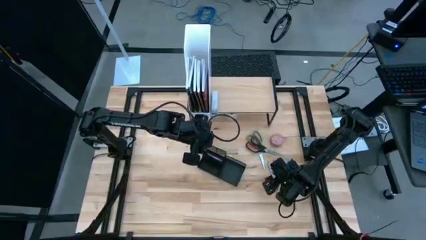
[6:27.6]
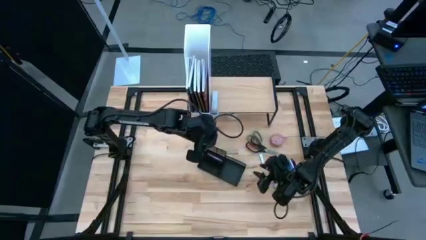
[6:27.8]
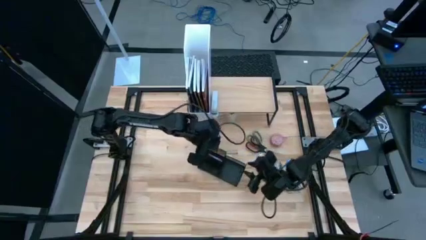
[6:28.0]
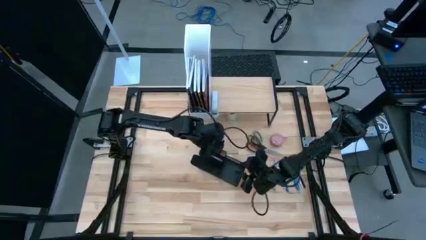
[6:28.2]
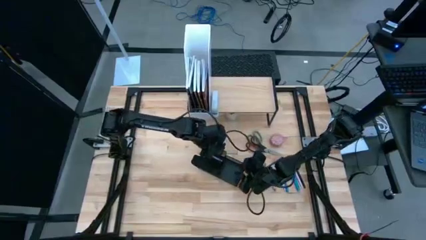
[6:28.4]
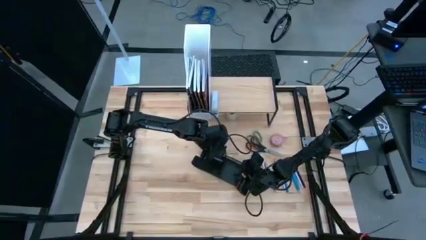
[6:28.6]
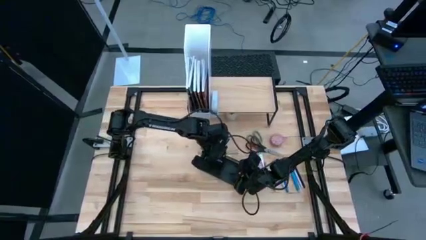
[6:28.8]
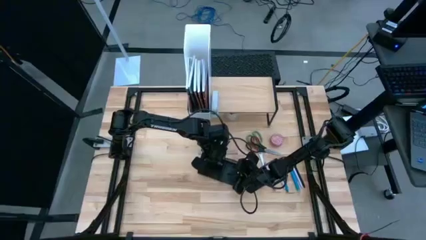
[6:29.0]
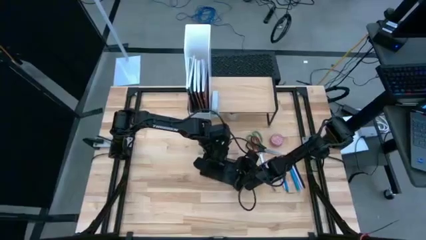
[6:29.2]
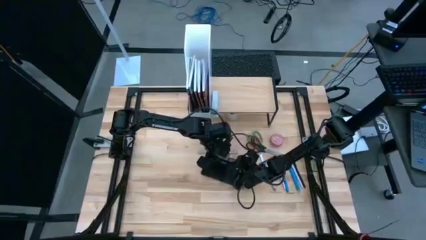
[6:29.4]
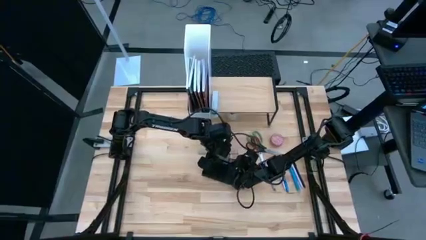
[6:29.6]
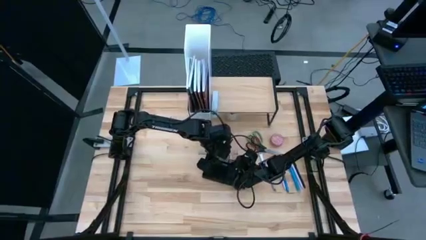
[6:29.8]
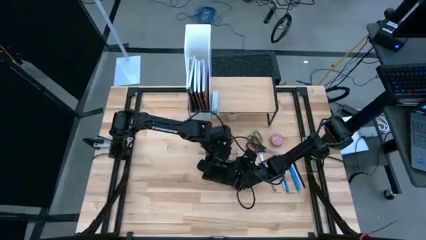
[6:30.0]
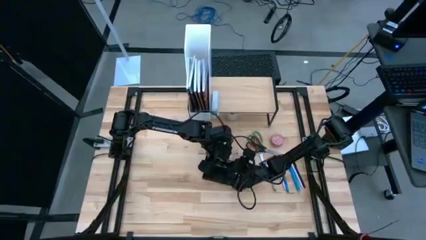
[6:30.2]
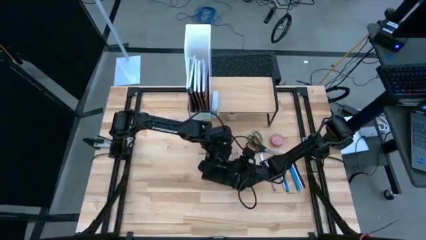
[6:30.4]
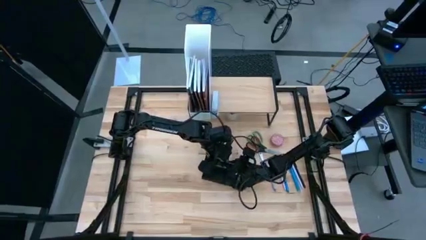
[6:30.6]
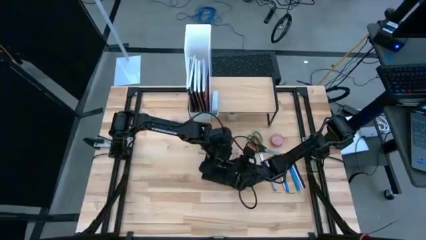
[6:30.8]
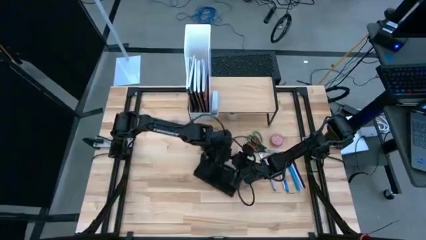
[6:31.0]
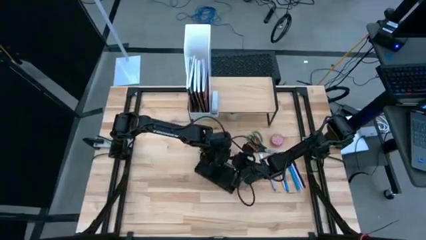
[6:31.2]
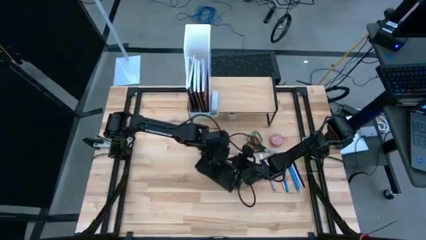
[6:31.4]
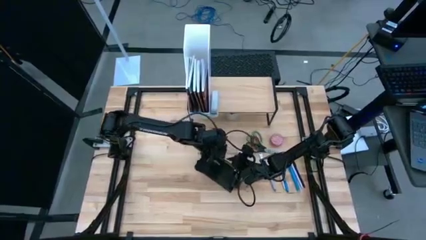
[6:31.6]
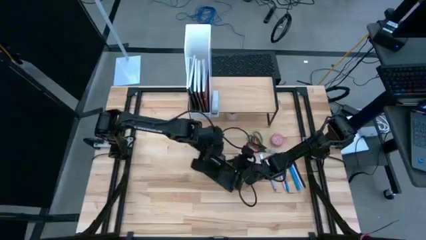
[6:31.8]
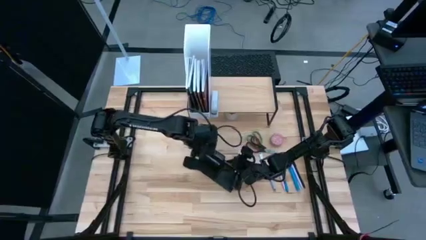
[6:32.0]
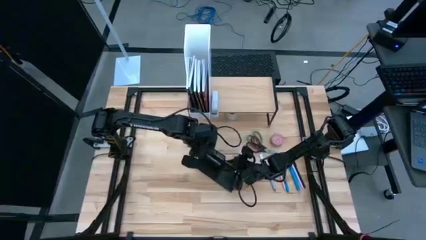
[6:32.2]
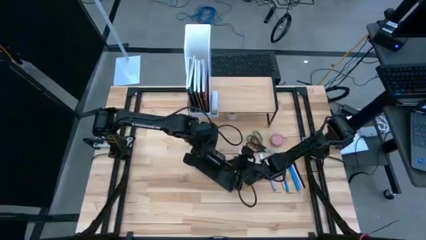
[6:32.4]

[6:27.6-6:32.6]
Task: Stock shelves
Remove the black pen from the desk organizer

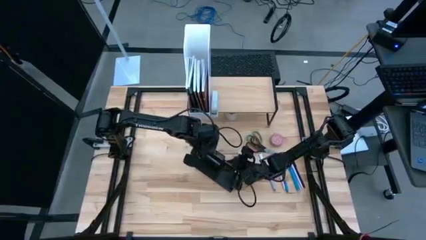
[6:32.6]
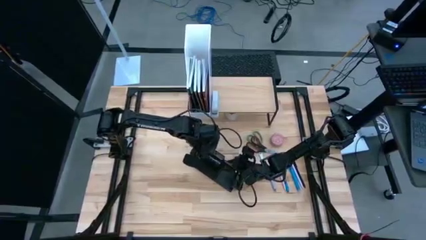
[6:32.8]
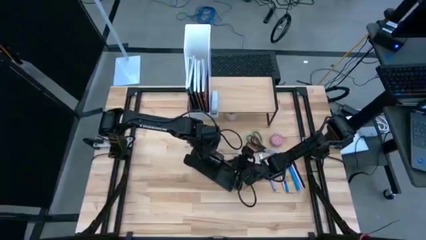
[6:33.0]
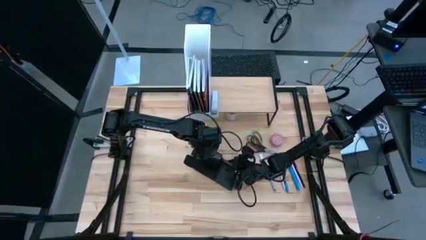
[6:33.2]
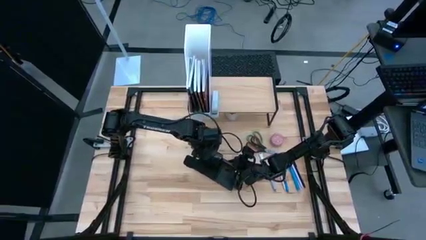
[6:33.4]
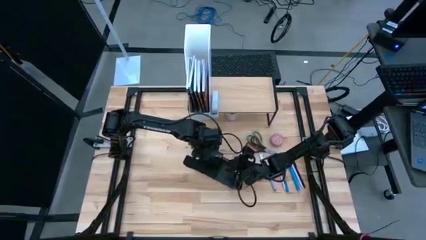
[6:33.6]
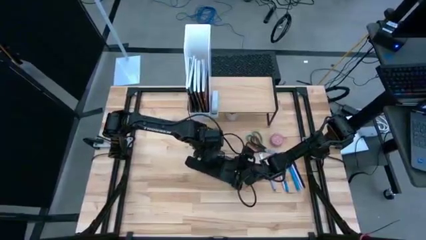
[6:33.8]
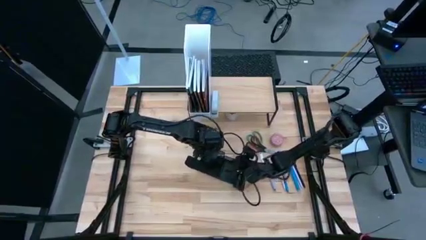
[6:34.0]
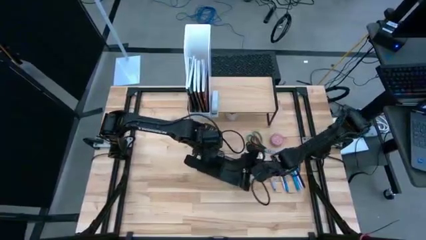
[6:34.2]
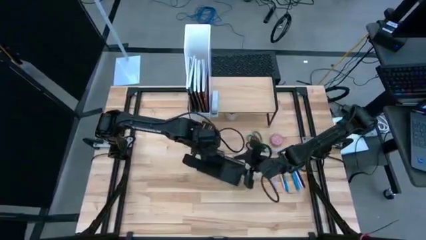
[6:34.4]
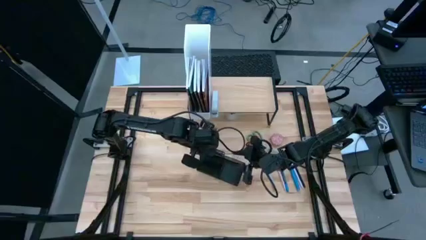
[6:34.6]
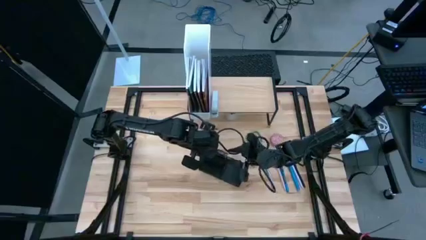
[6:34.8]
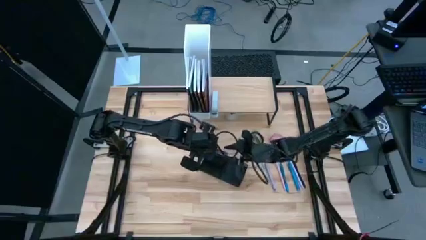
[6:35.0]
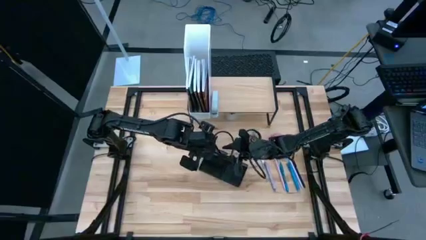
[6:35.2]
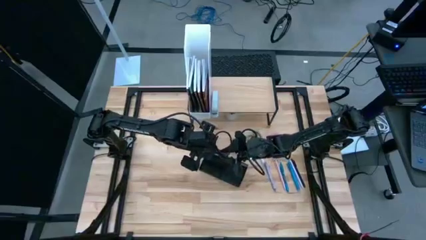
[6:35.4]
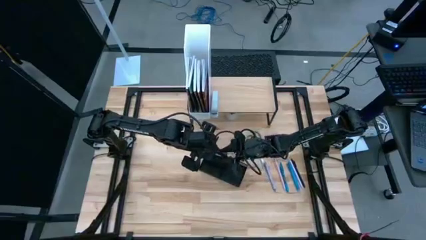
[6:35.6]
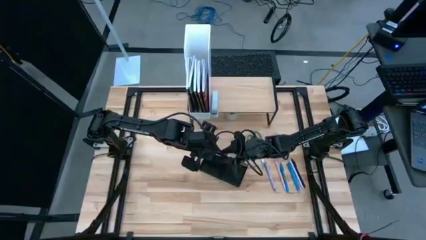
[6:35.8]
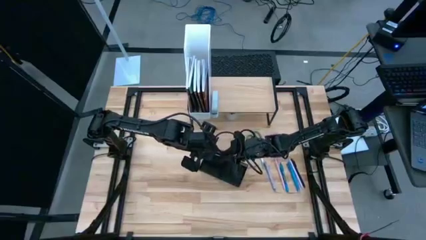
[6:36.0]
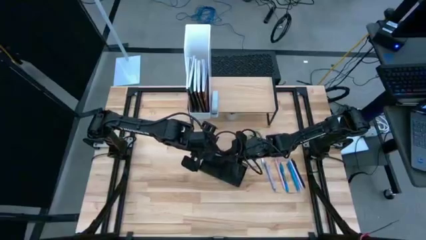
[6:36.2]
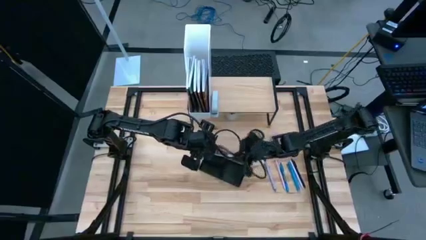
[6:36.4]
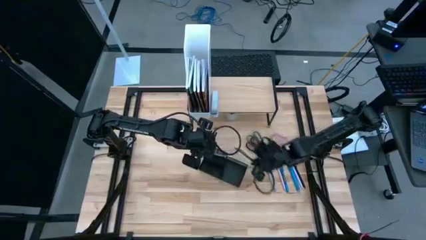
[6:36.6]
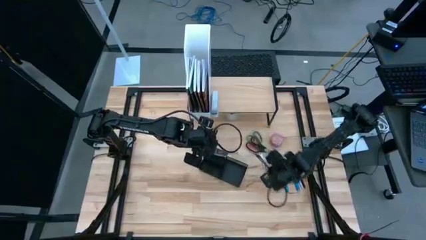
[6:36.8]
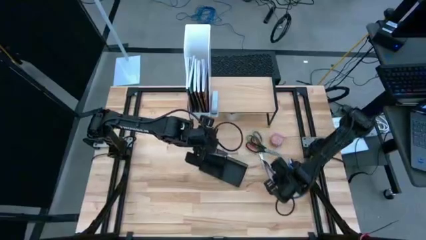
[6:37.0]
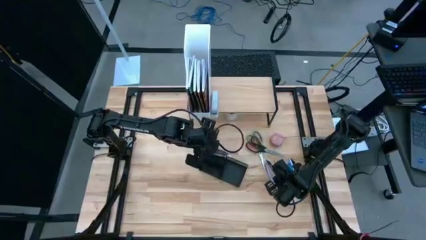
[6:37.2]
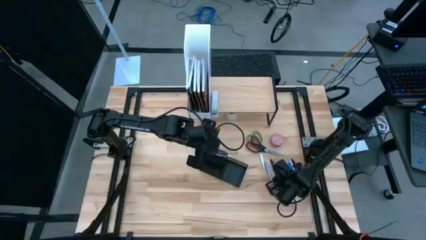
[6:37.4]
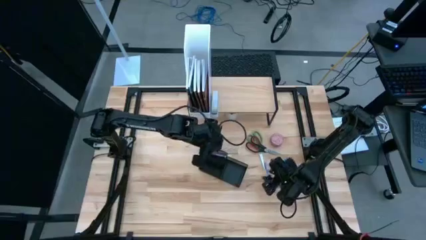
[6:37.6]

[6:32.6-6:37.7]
Remove the black pen from the desk organizer

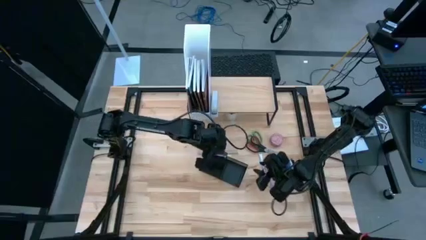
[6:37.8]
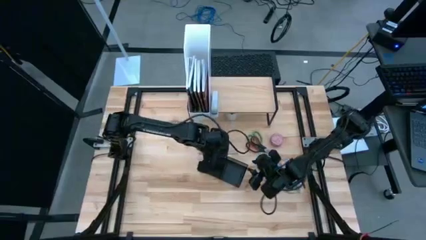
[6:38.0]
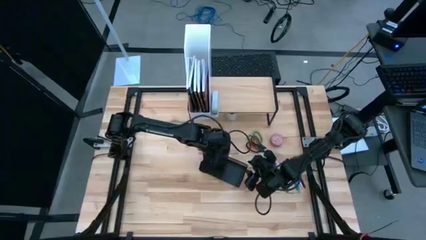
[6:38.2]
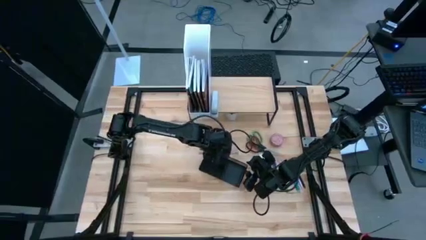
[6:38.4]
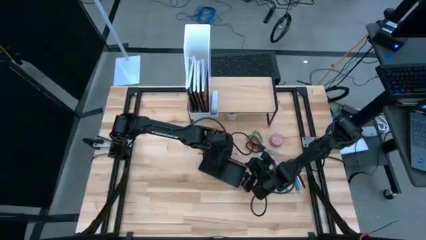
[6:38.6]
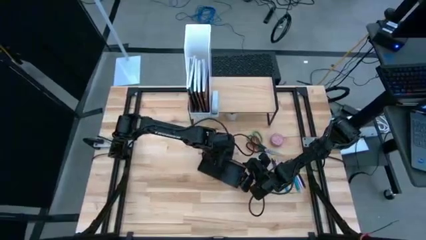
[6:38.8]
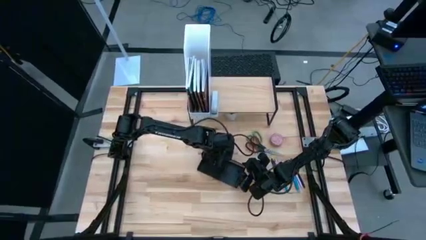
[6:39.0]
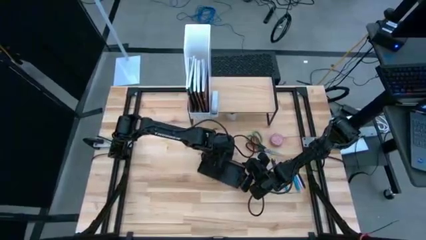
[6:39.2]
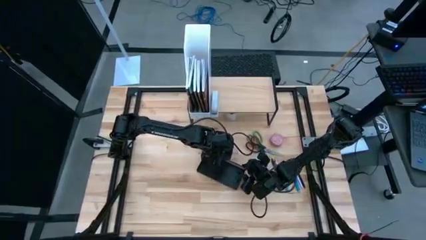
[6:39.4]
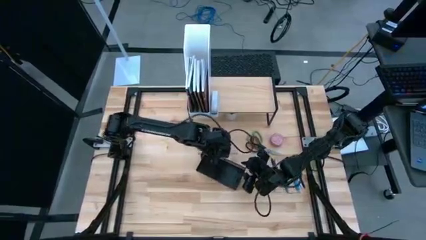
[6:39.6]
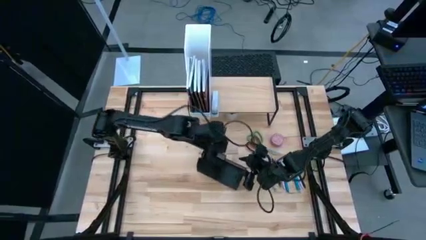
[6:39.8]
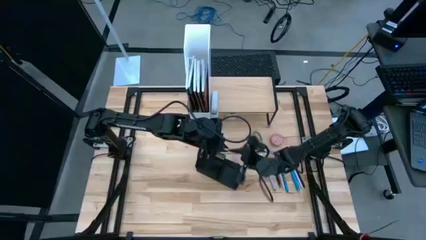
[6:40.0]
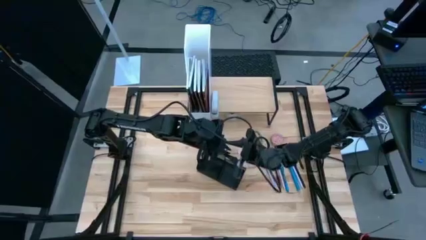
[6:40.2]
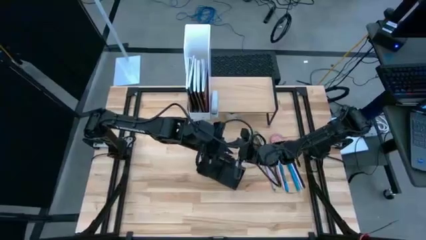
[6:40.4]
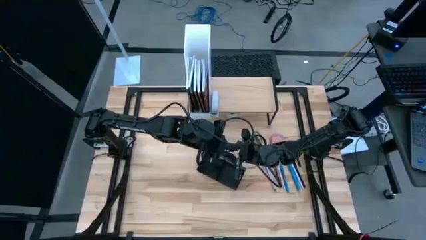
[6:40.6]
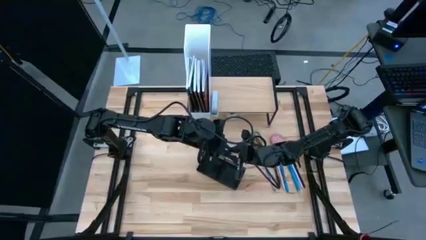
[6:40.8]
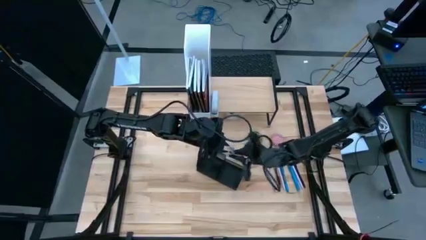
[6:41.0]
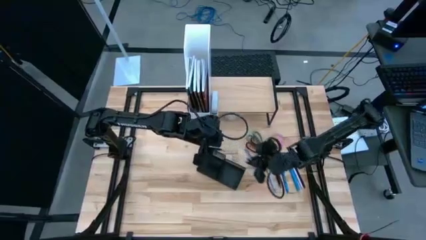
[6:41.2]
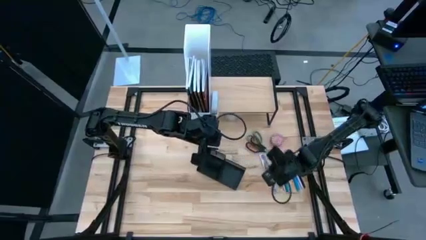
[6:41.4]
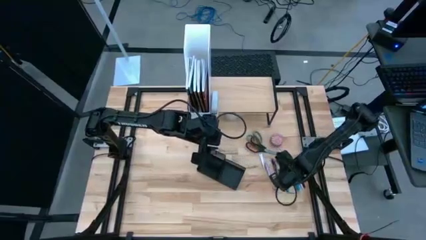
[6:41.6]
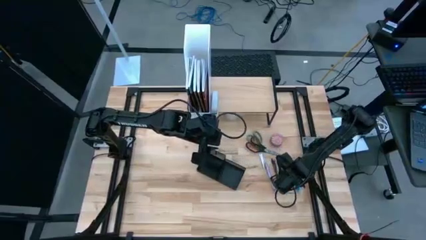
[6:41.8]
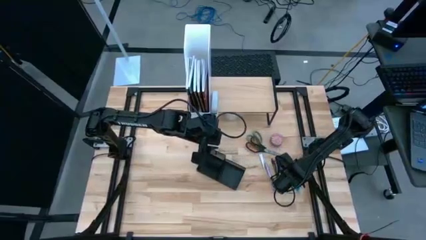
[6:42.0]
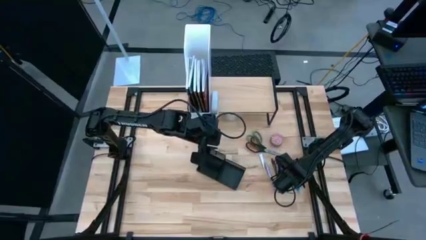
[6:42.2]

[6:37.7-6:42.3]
Remove the purple pen from the desk organizer

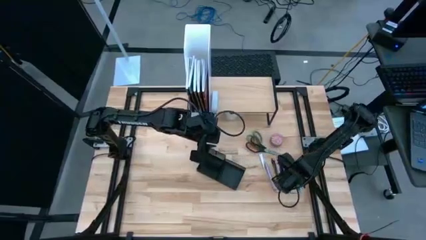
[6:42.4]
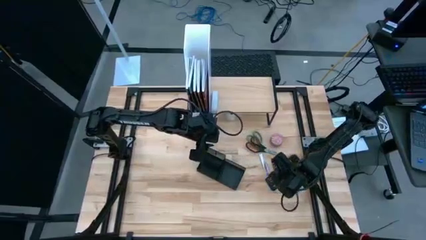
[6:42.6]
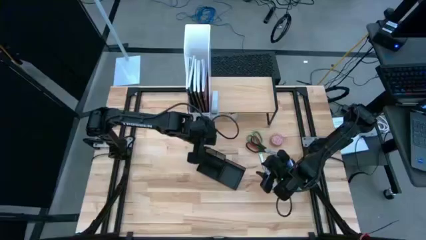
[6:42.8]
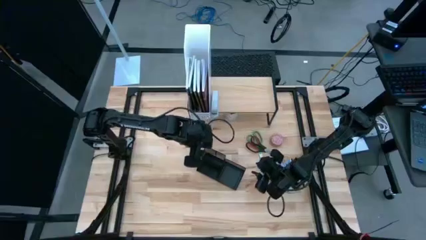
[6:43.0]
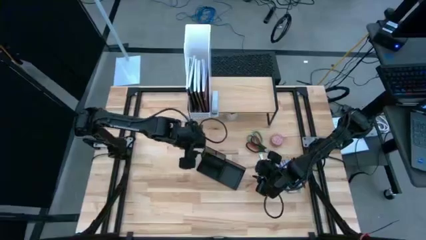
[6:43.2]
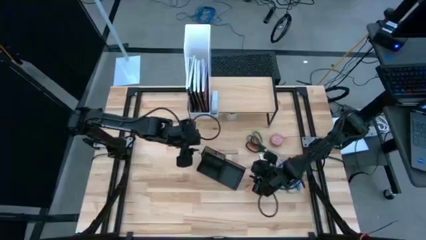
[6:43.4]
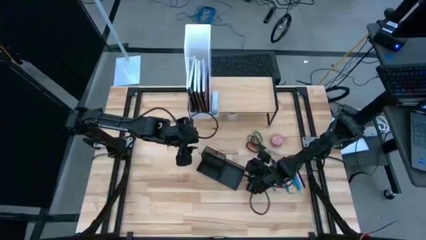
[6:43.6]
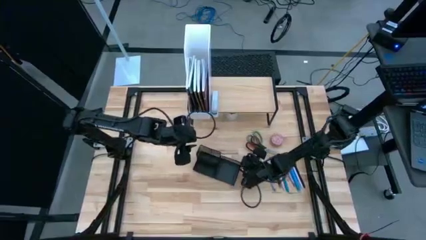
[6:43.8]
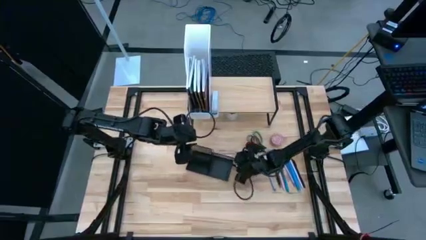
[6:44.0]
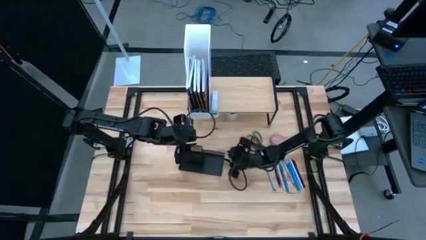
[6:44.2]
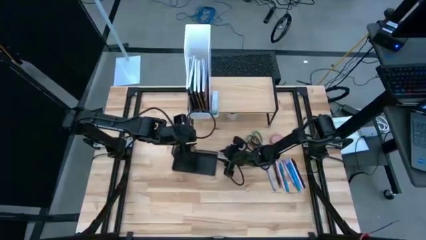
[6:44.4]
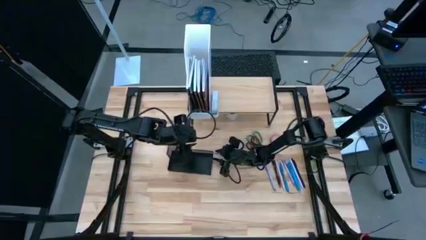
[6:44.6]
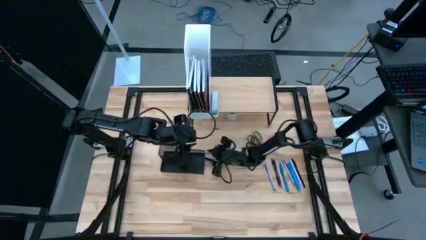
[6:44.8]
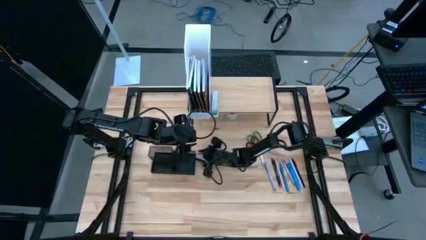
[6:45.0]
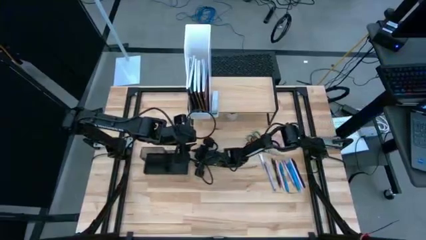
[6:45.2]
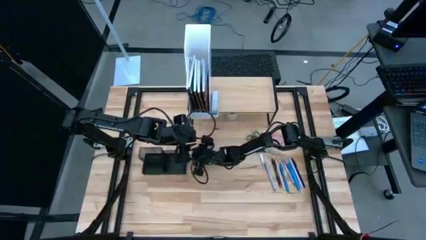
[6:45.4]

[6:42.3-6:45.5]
Move the desk organizer to the middle left of the table
